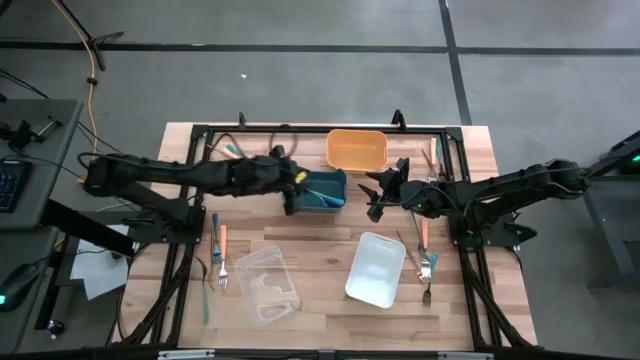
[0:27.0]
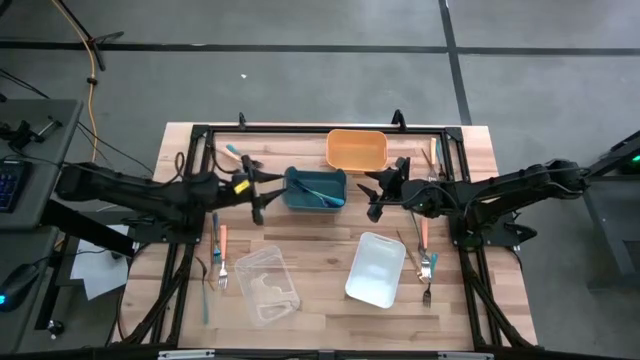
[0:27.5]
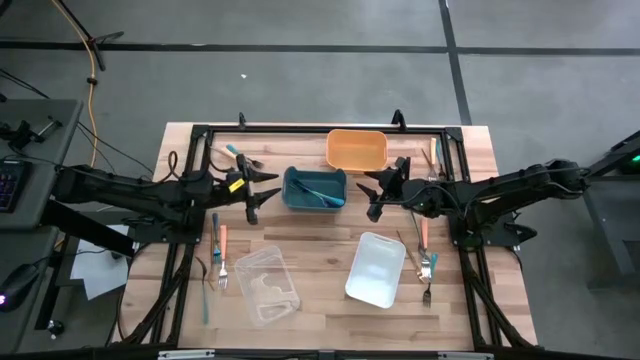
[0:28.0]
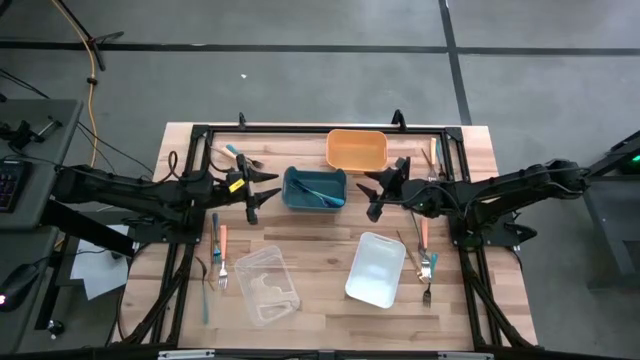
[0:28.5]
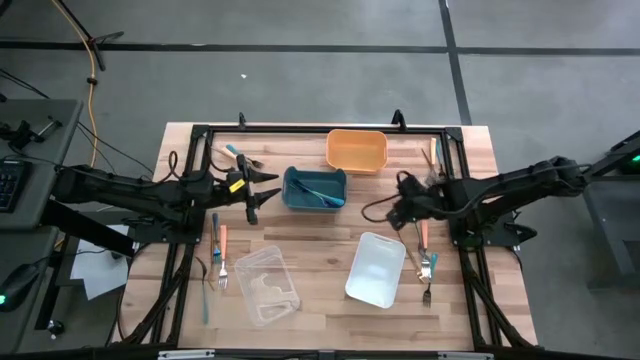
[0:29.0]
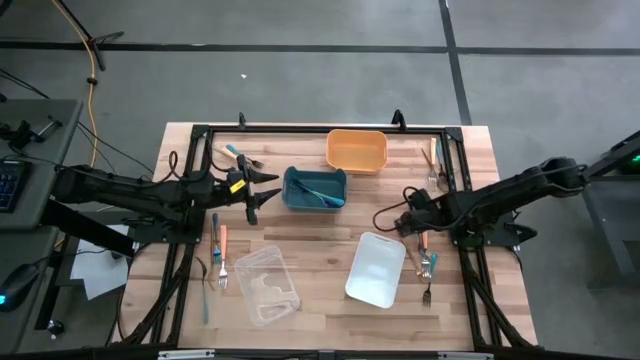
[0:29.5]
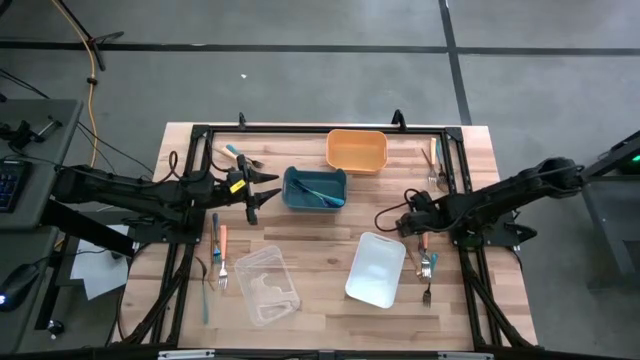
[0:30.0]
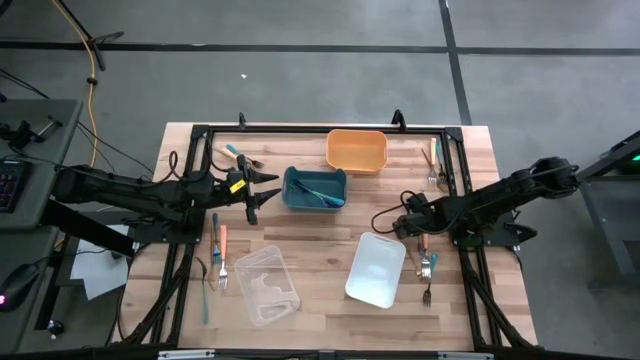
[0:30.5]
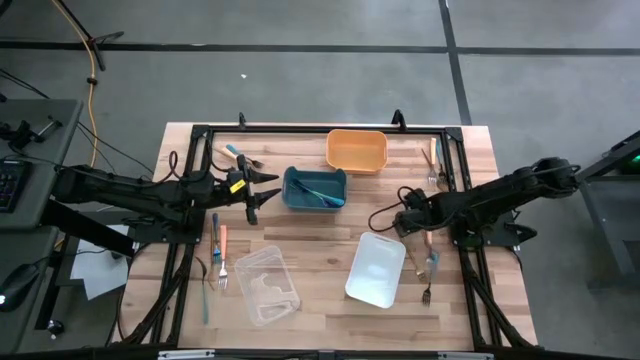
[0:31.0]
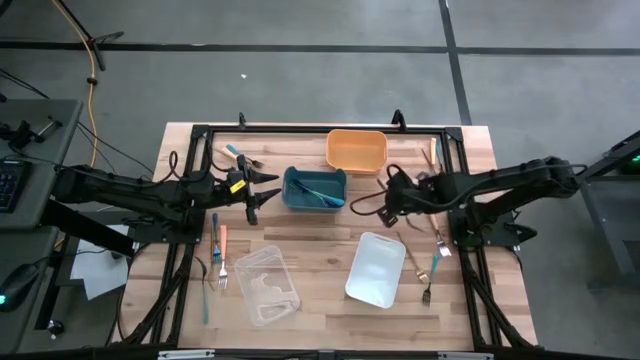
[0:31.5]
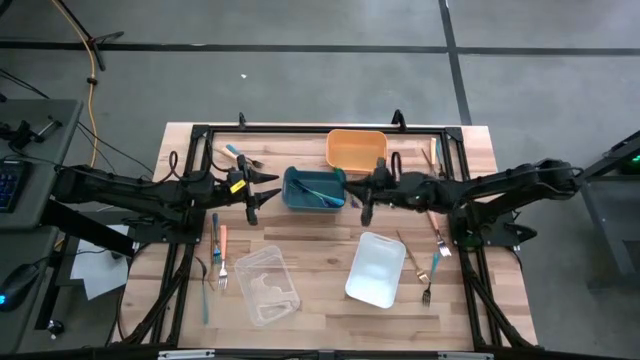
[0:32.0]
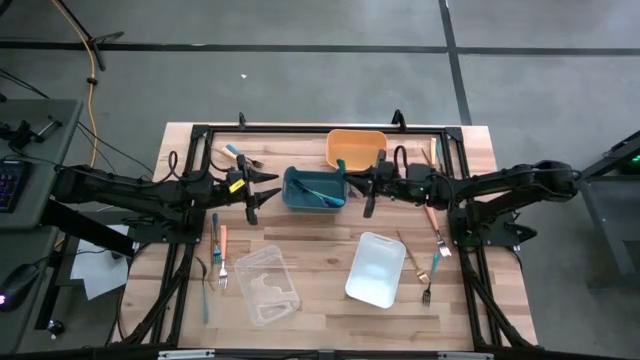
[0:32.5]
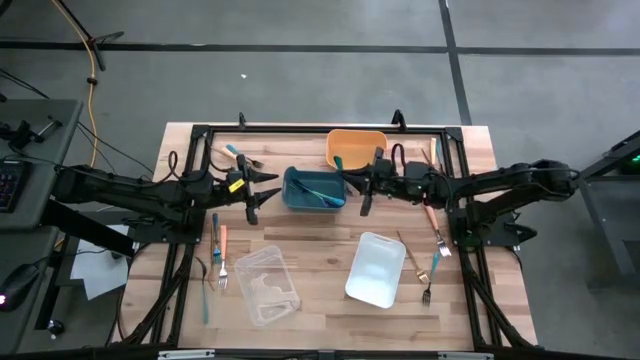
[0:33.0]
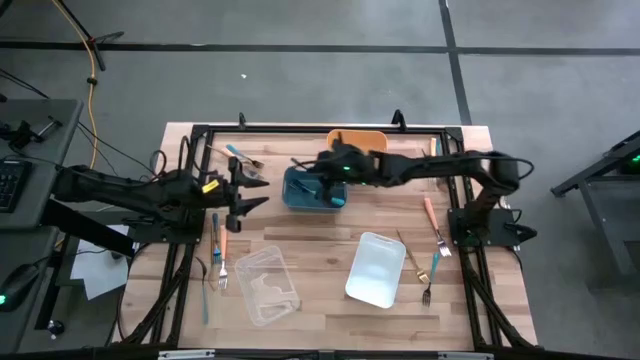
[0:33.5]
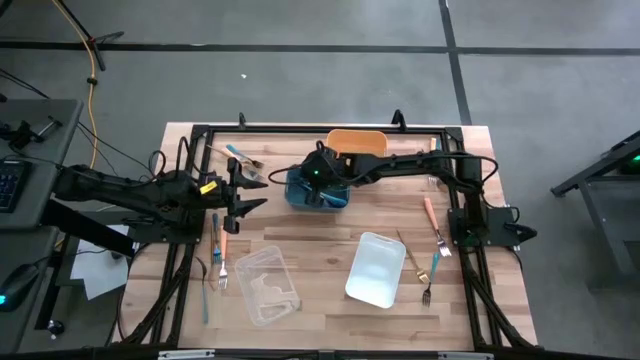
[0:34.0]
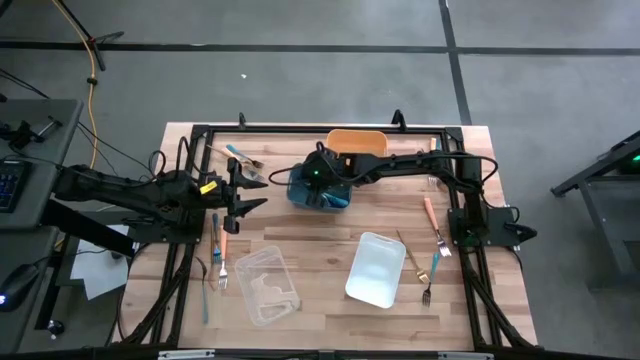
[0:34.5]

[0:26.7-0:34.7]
Task: Sort silverware by color (type)
Put the blue fork into the blue bin

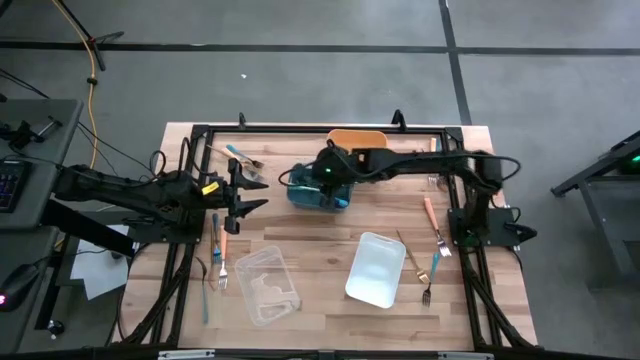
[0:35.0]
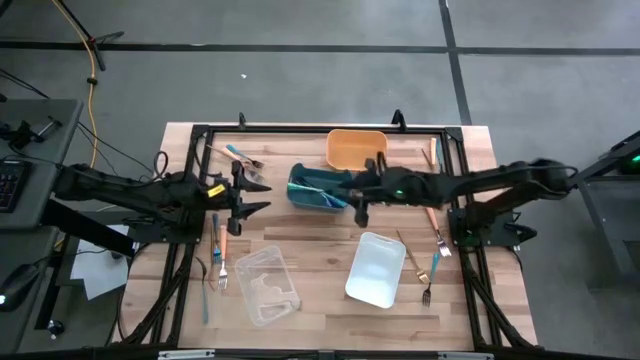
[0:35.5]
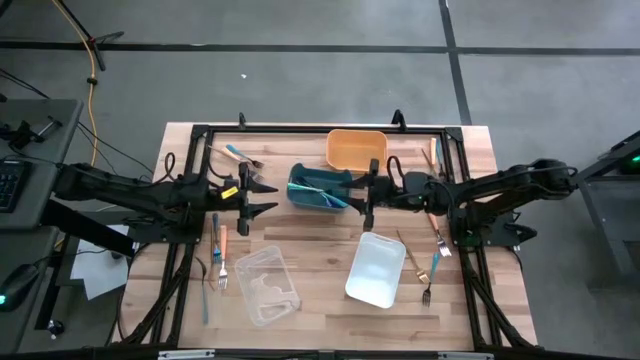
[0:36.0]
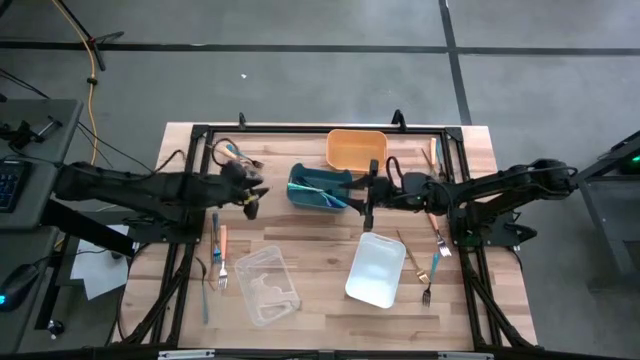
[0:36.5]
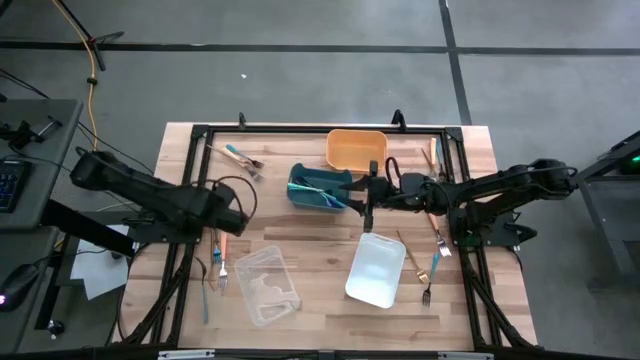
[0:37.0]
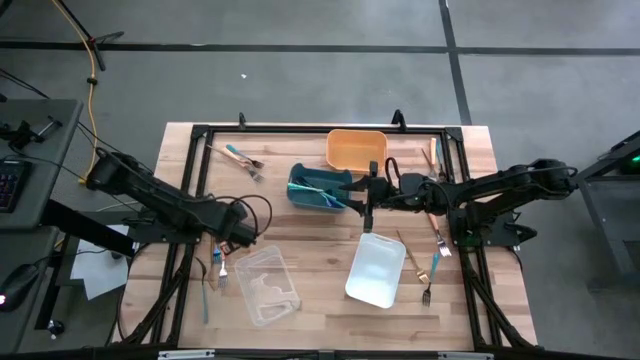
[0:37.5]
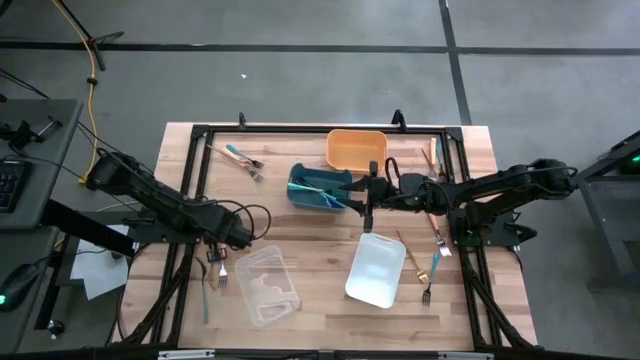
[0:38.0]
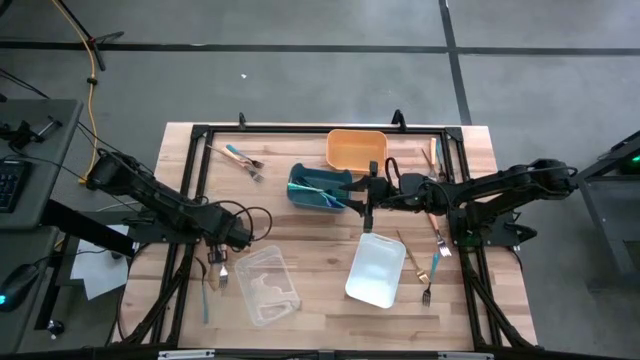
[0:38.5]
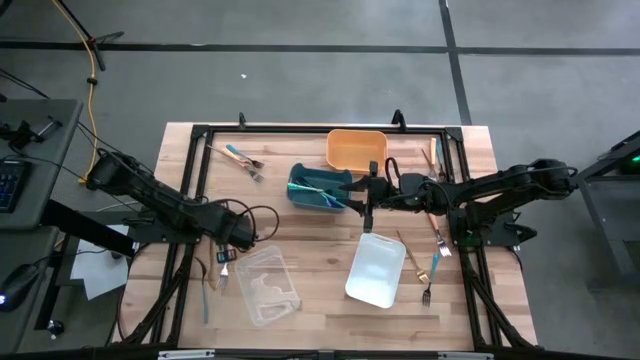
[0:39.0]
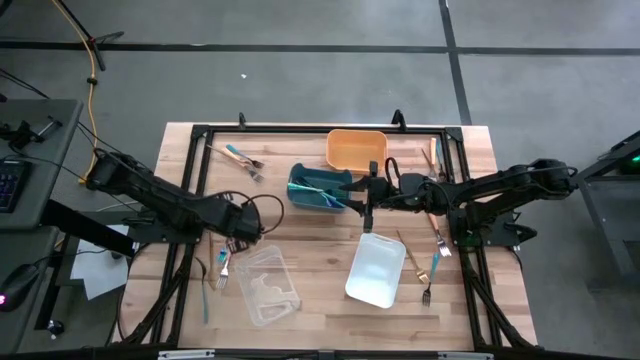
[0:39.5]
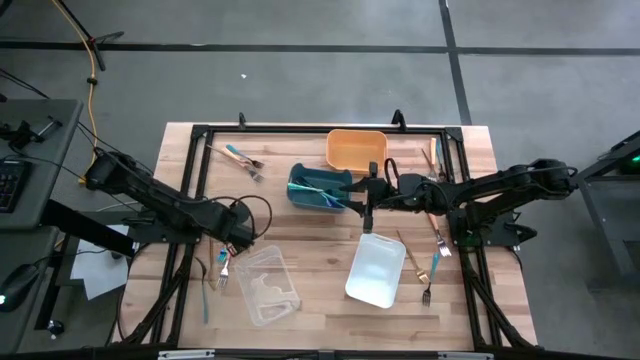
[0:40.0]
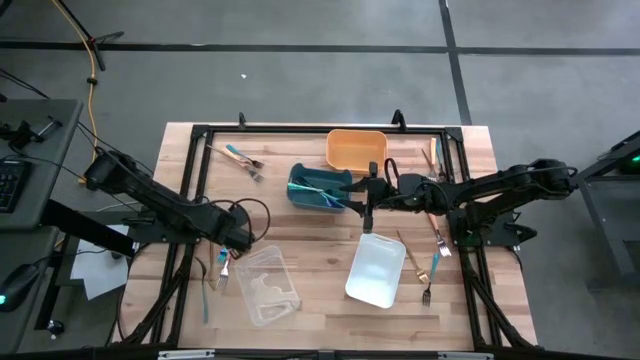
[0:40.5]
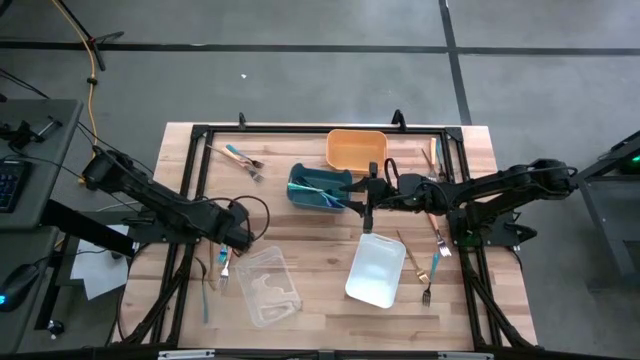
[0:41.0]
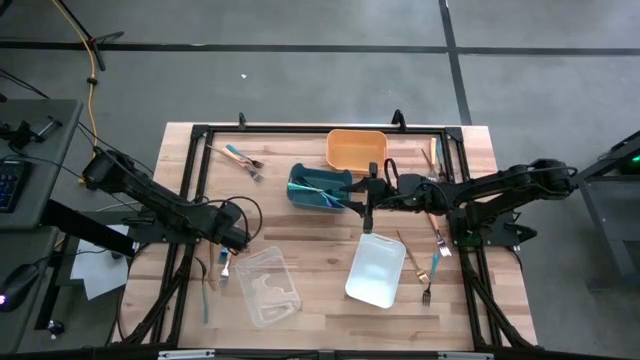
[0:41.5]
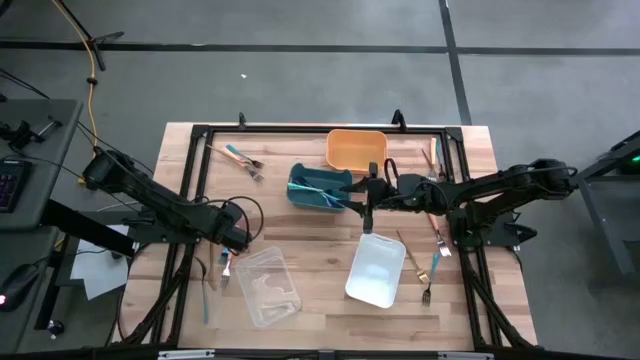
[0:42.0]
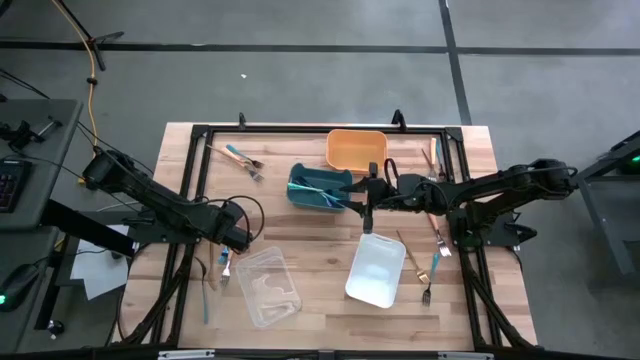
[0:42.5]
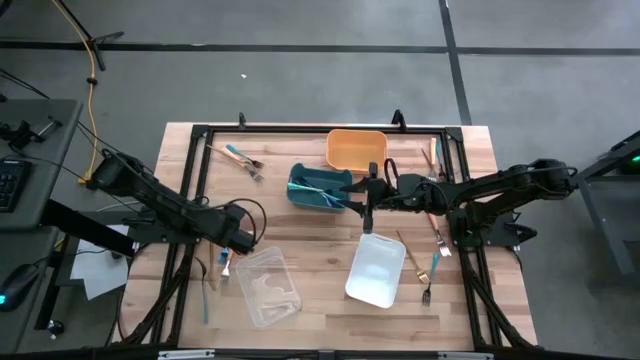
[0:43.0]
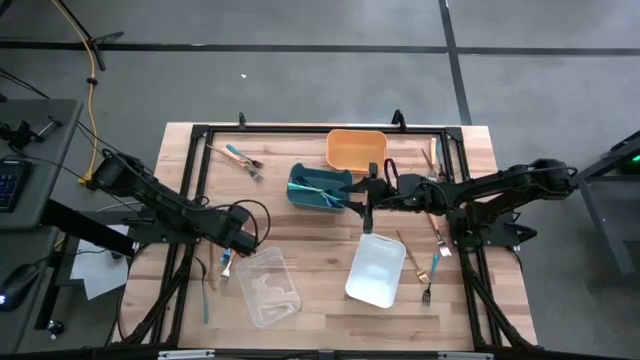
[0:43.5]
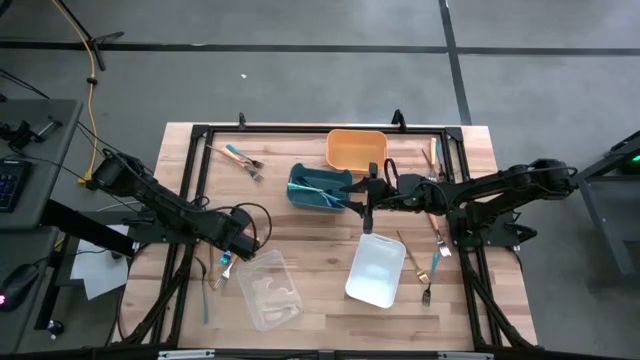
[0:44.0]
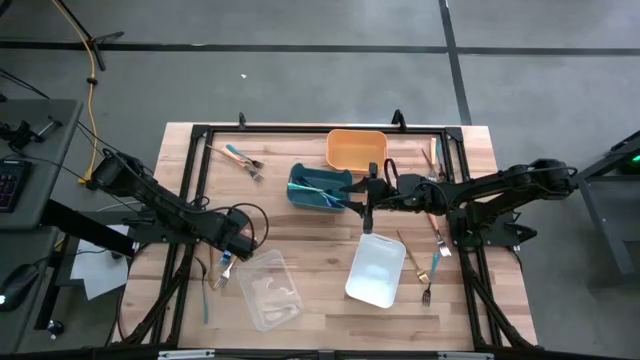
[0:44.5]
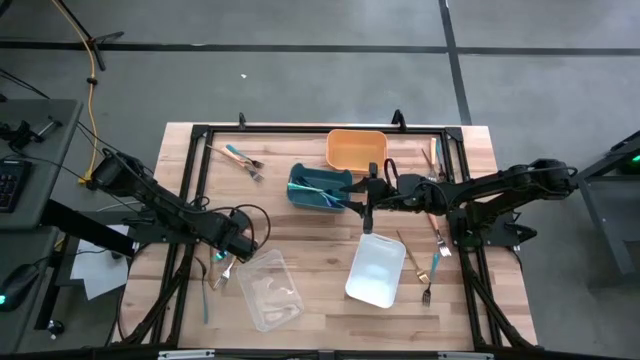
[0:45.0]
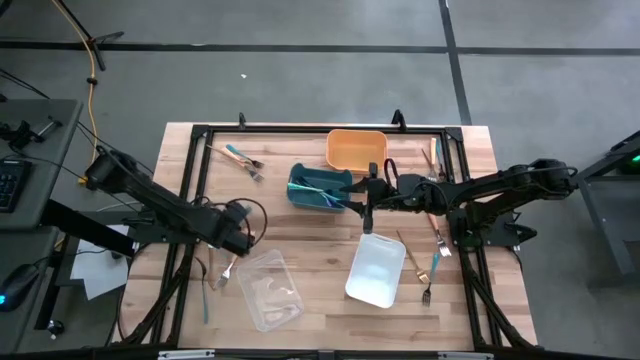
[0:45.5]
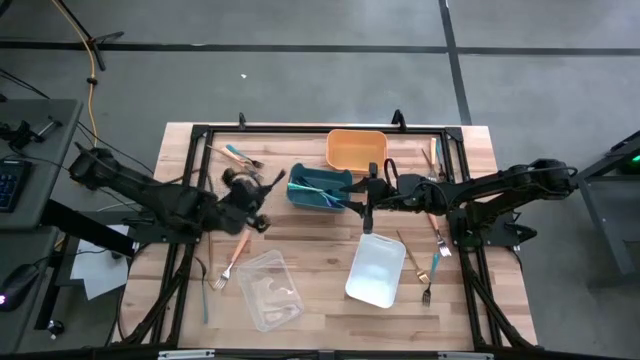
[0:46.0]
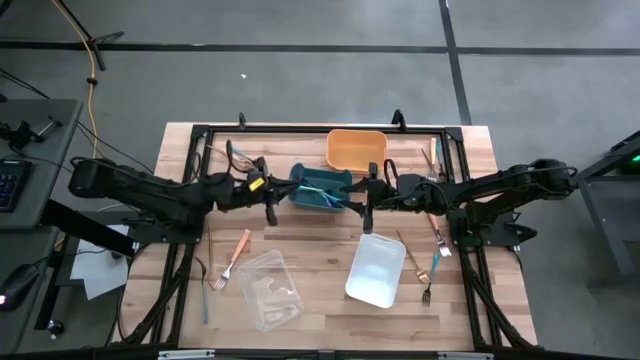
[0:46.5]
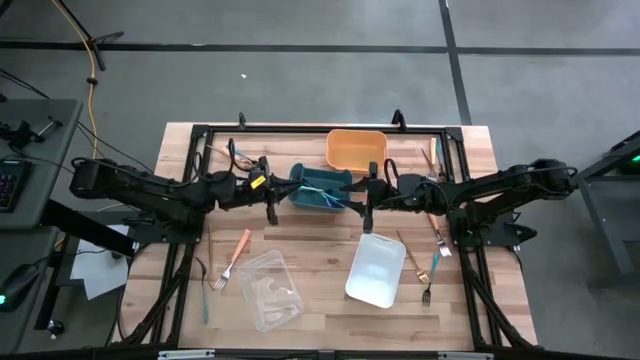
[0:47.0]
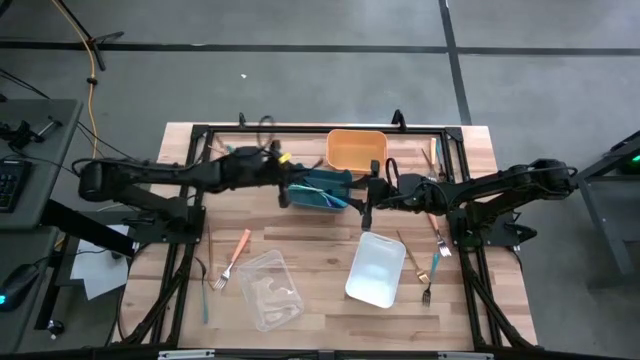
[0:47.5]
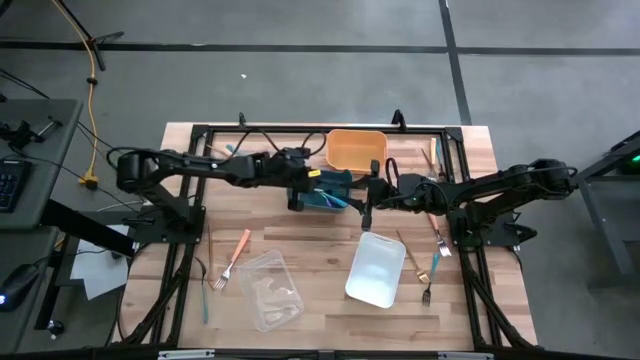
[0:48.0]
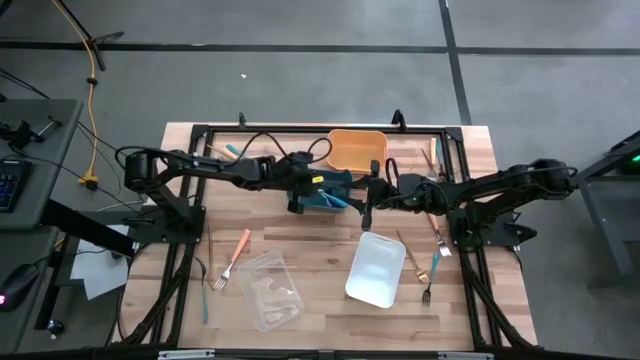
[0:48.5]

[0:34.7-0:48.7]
Put the blue fork into the blue bin
